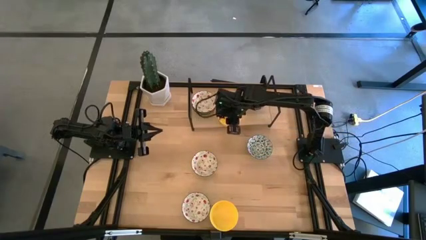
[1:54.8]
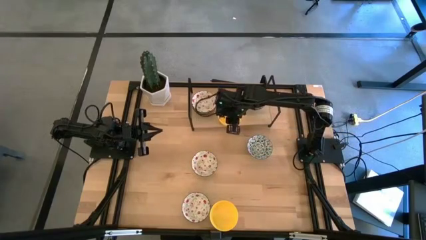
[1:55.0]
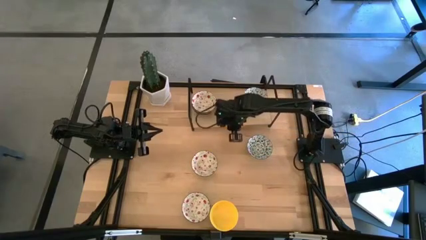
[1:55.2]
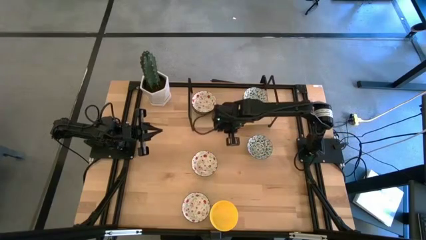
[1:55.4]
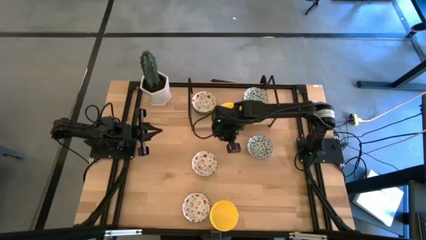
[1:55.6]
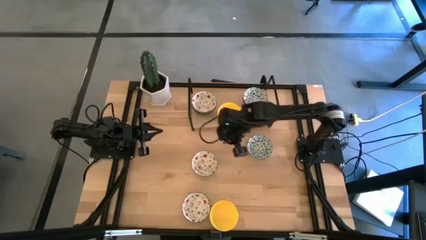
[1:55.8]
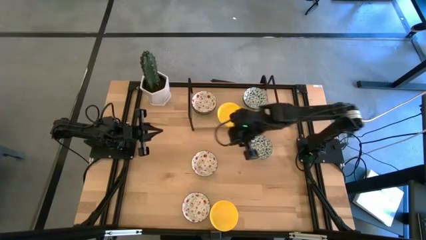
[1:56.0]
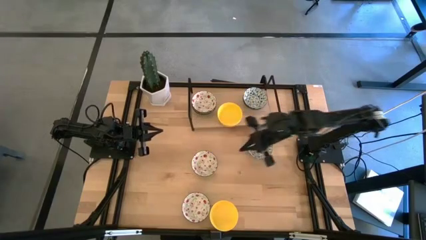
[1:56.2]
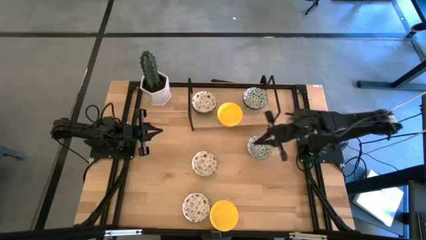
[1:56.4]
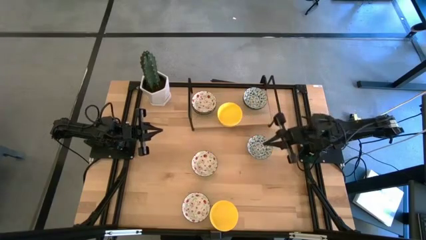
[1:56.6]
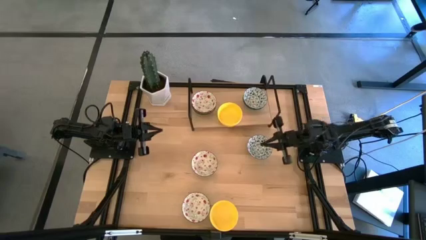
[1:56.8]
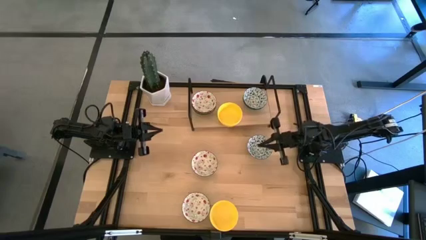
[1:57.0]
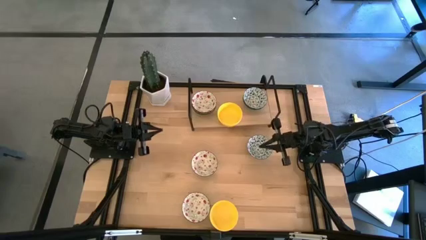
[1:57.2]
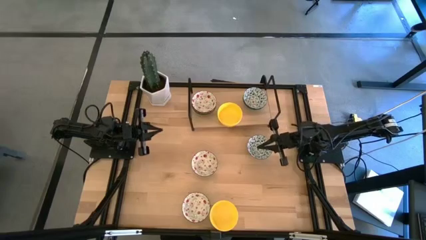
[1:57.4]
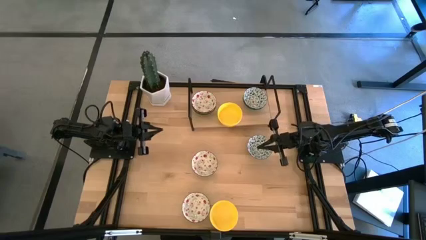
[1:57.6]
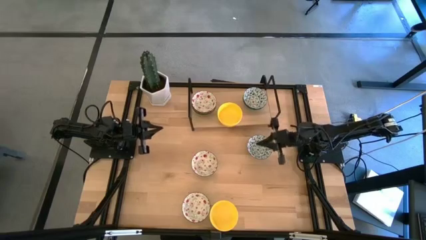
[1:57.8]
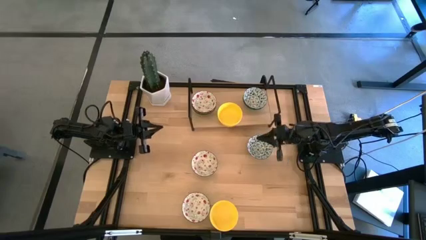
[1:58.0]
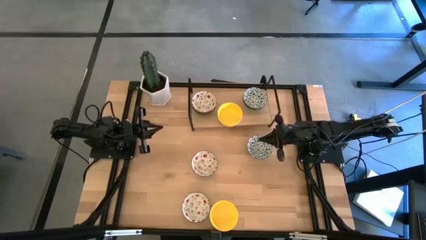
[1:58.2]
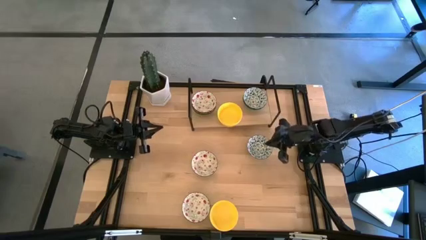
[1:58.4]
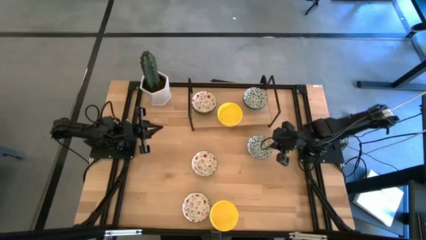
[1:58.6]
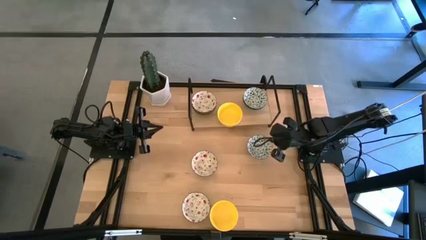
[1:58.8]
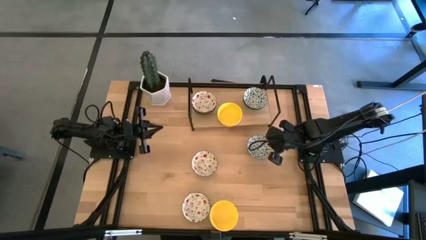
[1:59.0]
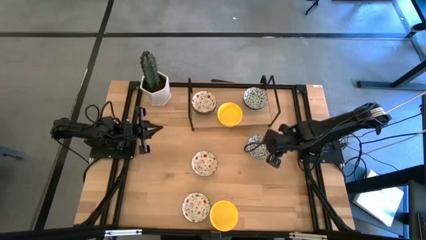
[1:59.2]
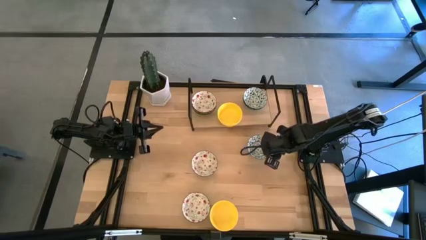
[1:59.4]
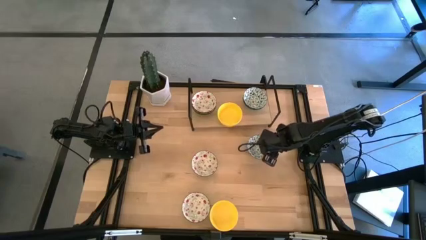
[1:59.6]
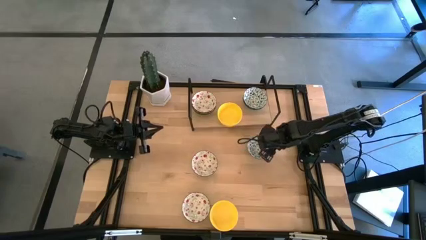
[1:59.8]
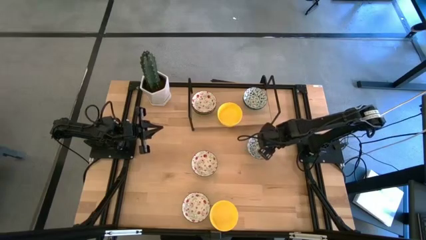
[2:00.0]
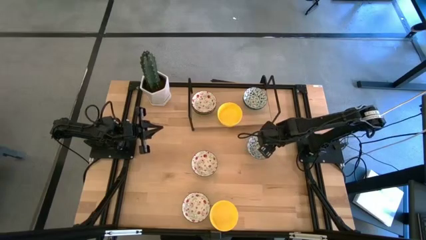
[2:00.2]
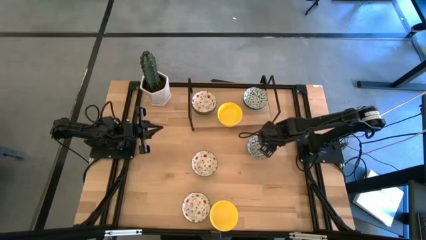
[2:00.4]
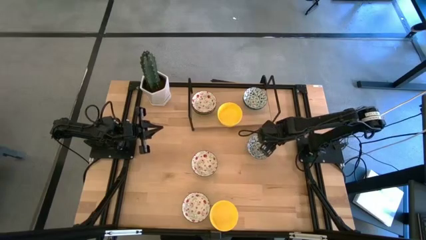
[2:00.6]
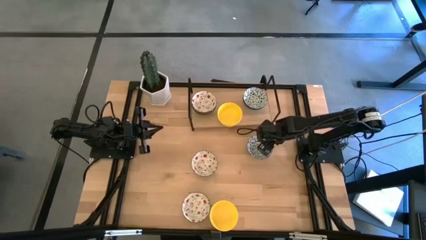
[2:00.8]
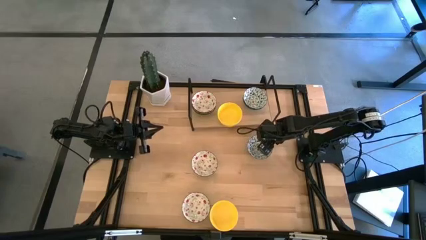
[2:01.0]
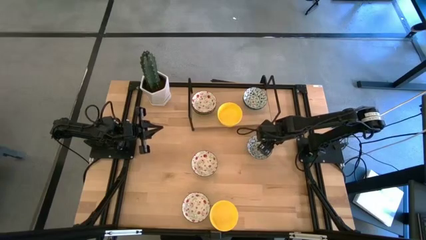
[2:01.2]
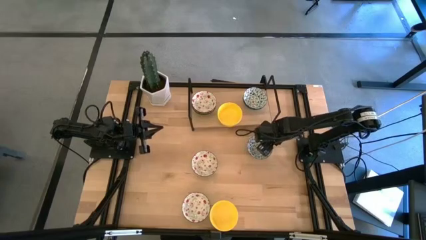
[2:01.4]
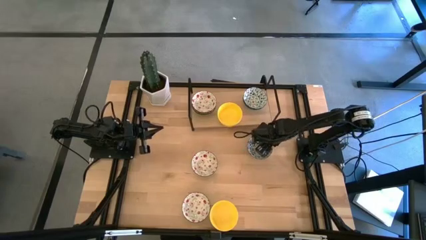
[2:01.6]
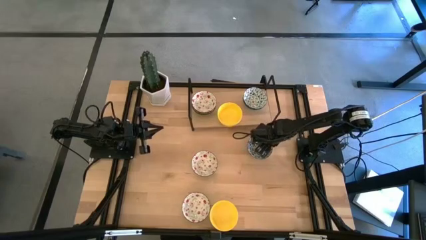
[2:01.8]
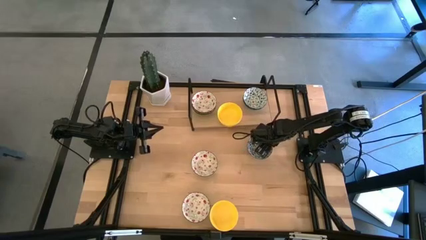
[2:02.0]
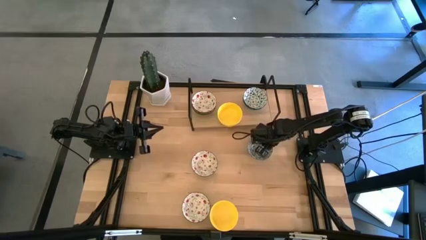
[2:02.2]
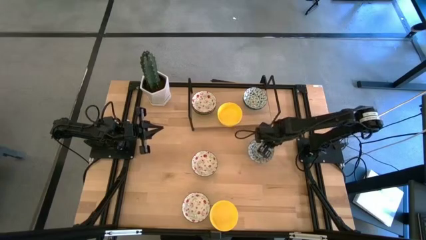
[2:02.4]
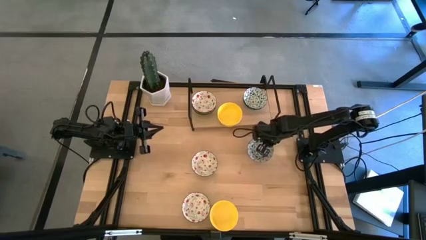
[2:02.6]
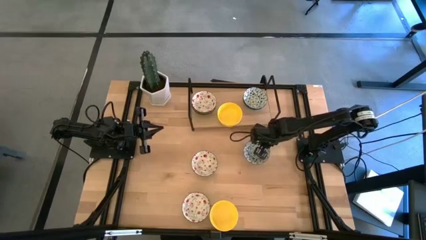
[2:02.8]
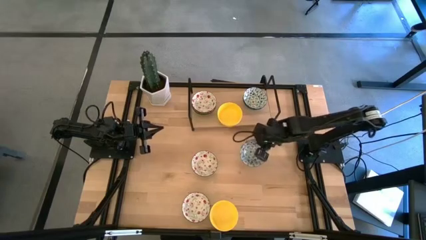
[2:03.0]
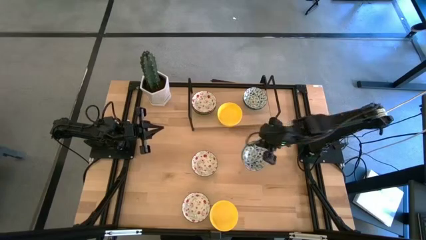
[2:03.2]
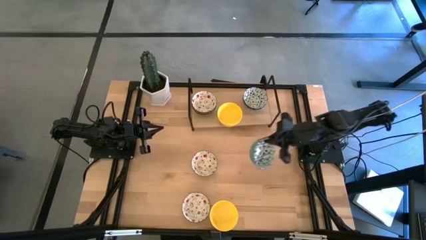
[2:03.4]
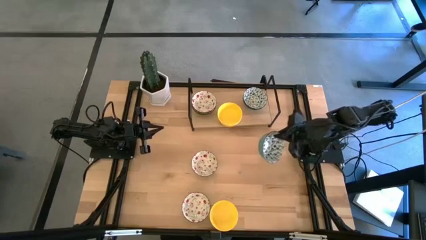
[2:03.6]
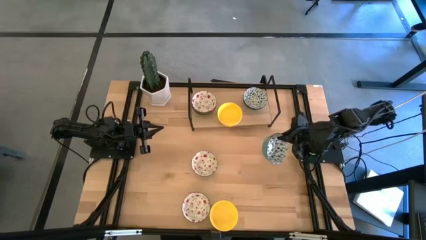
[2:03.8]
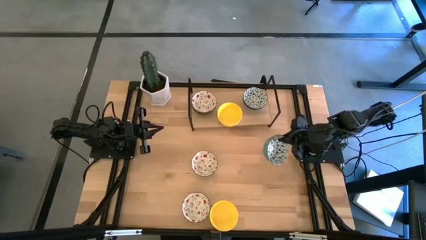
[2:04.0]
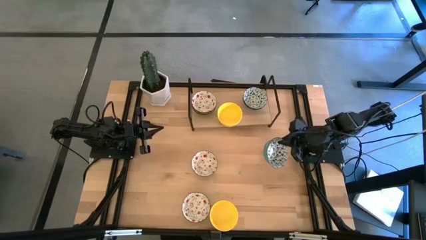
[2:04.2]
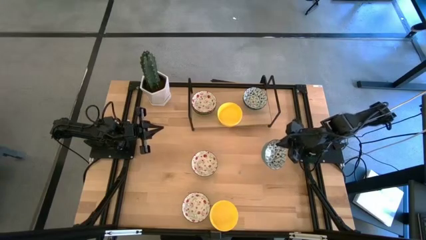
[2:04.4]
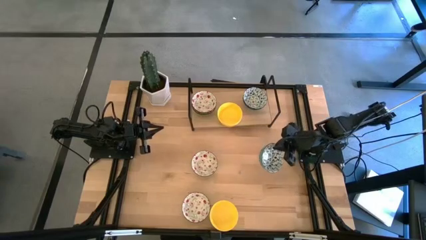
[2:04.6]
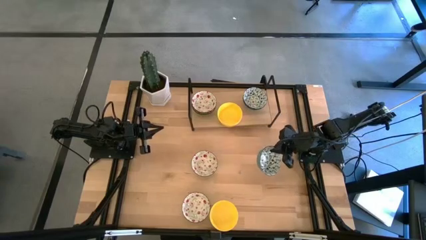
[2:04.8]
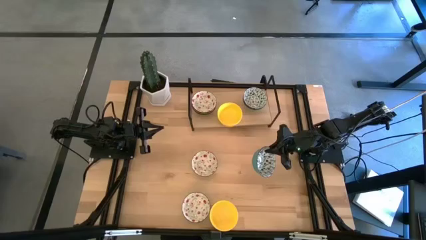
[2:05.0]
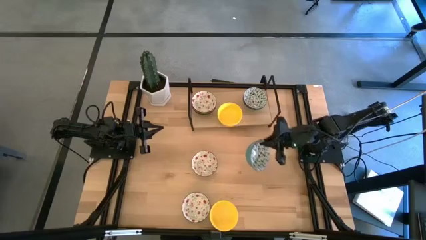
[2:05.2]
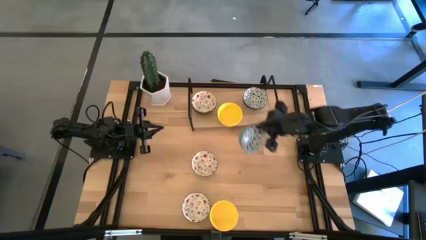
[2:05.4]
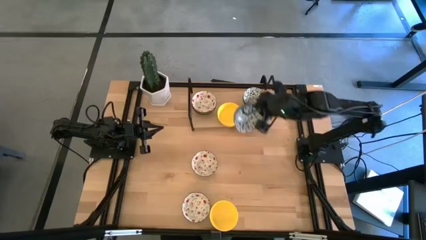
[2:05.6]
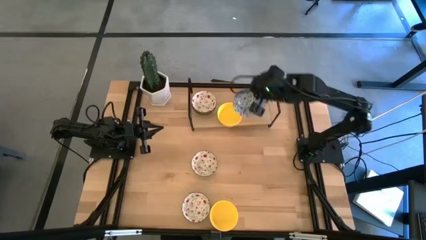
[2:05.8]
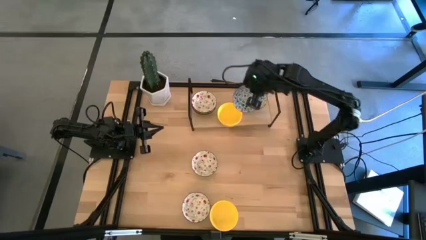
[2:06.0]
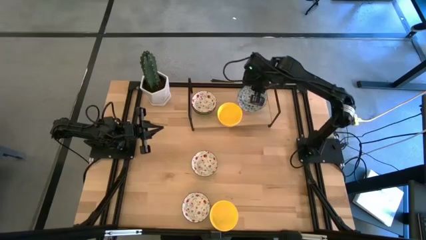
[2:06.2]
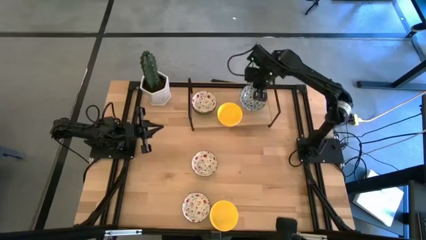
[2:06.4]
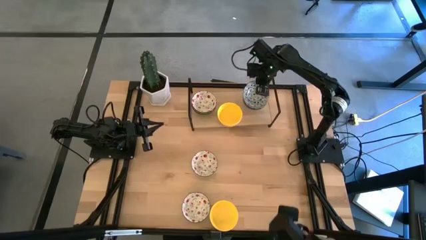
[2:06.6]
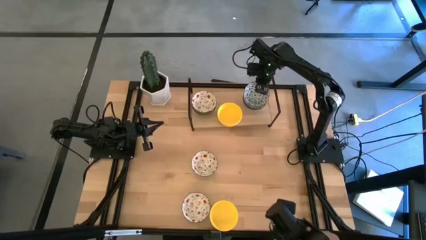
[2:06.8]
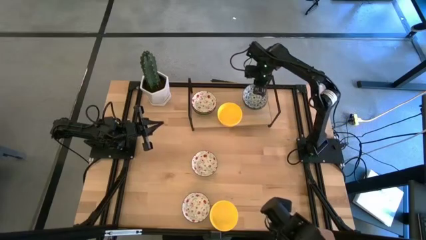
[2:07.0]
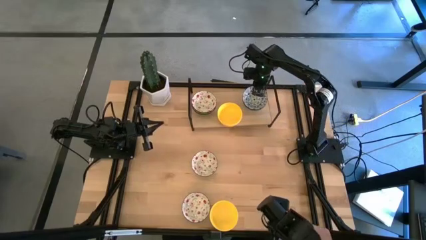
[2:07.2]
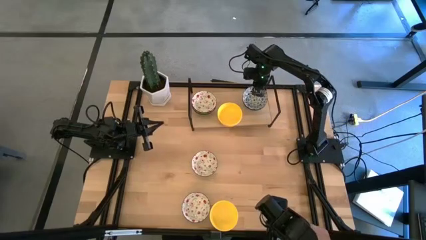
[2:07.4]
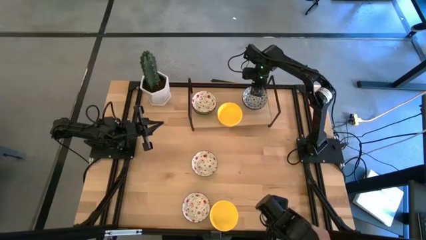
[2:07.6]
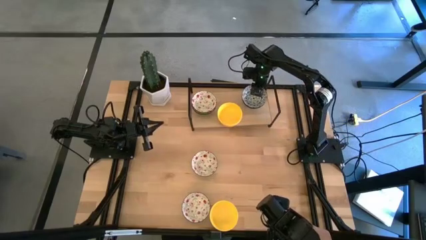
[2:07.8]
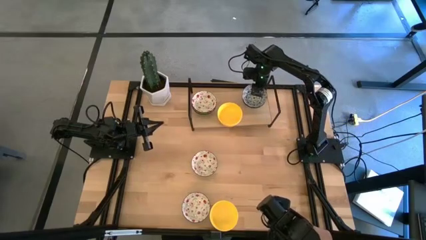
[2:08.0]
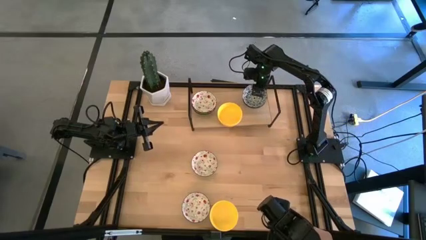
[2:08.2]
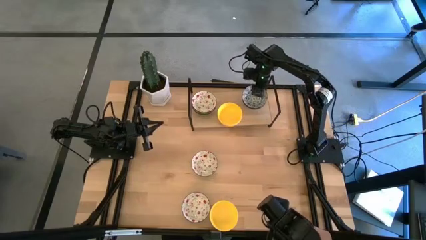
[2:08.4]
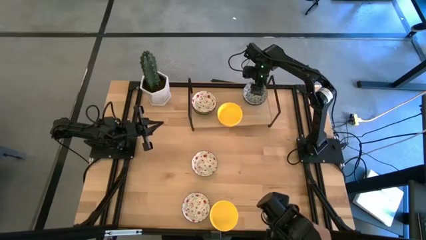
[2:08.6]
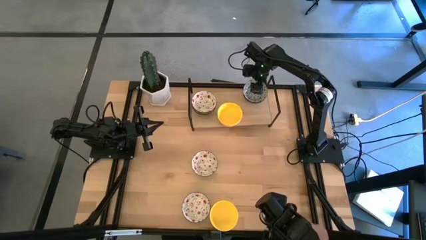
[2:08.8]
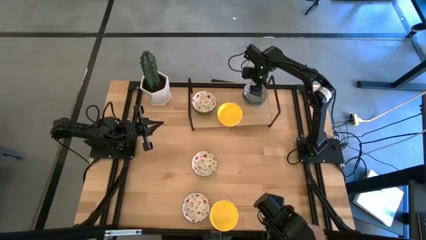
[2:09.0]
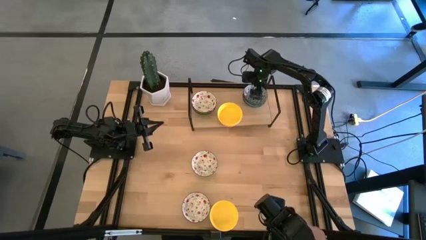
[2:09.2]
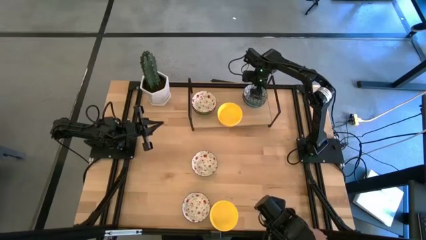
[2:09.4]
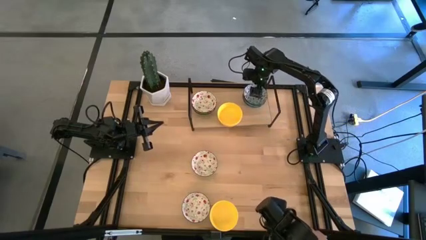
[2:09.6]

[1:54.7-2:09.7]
Task: Pick & Place Mini bowls
Stack the blue patterned bowl on the blue patterned bowl on the shelf
